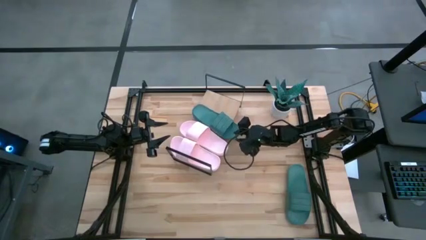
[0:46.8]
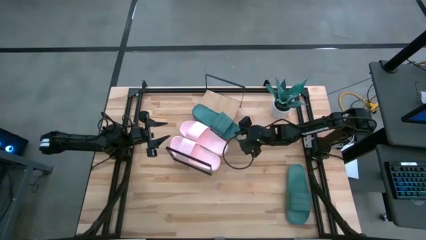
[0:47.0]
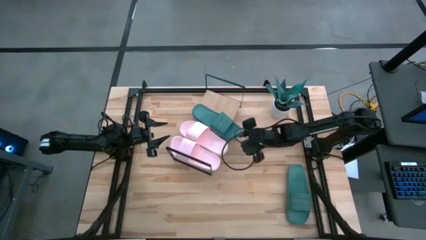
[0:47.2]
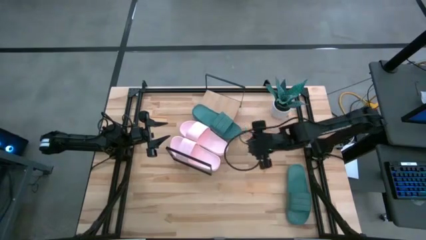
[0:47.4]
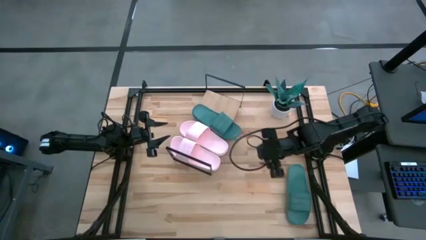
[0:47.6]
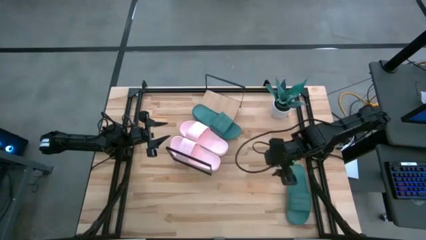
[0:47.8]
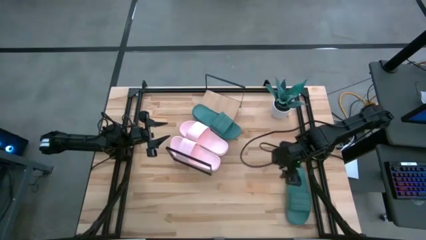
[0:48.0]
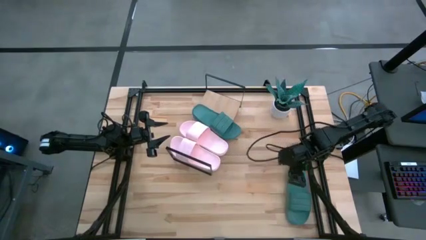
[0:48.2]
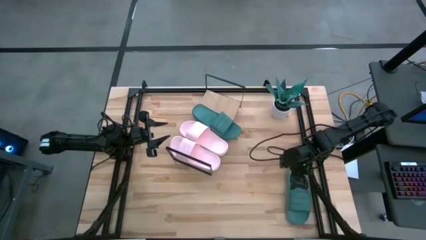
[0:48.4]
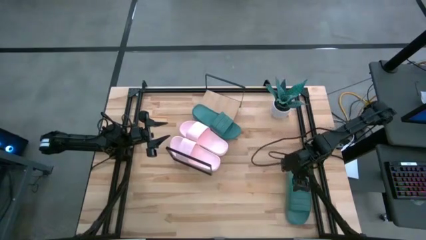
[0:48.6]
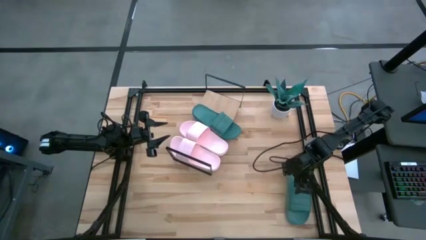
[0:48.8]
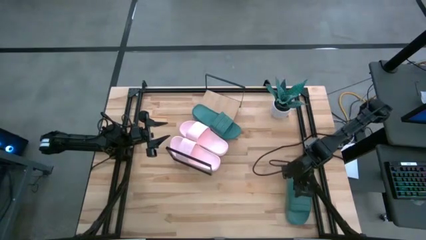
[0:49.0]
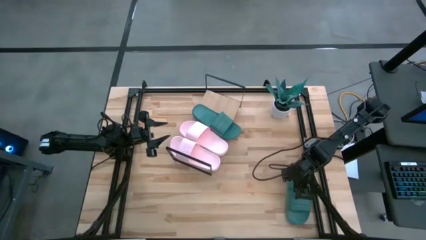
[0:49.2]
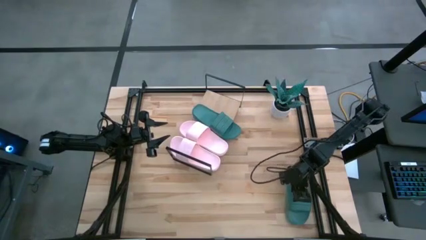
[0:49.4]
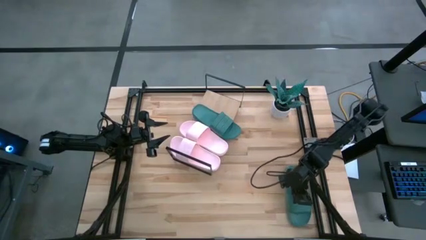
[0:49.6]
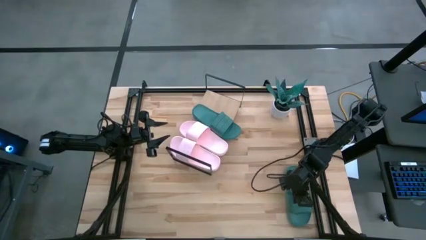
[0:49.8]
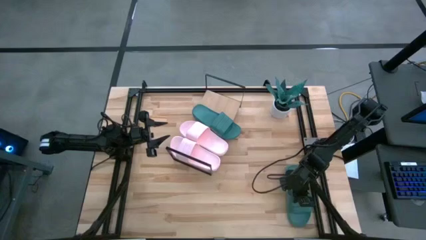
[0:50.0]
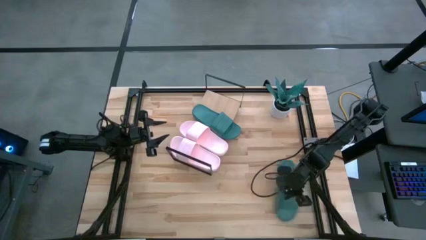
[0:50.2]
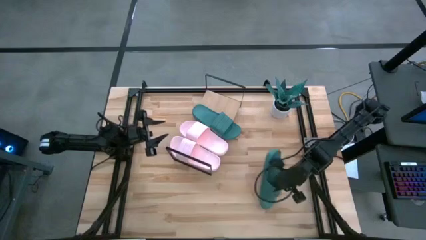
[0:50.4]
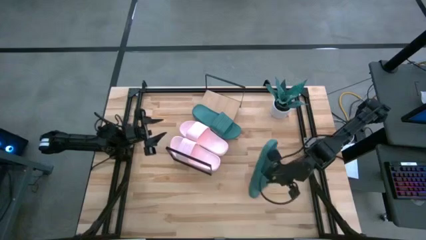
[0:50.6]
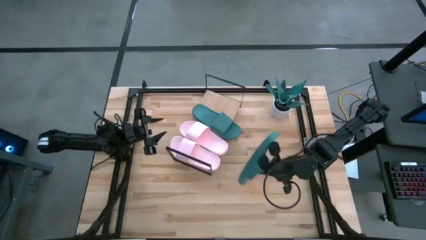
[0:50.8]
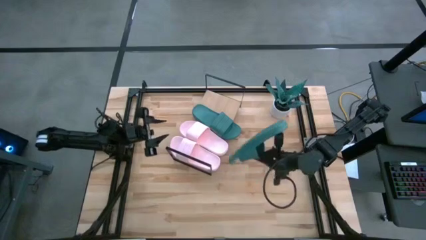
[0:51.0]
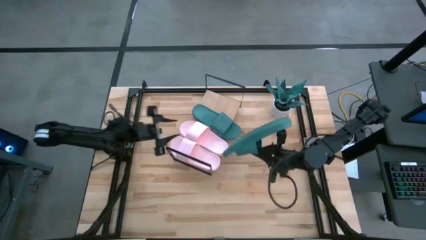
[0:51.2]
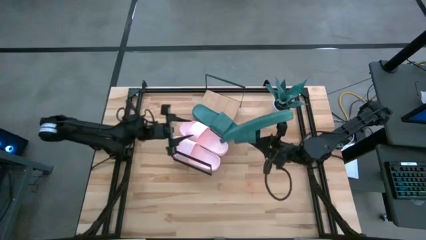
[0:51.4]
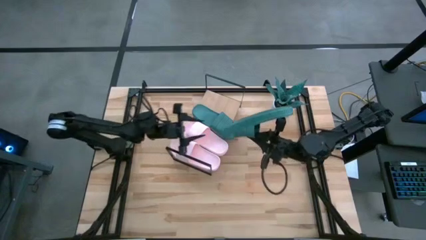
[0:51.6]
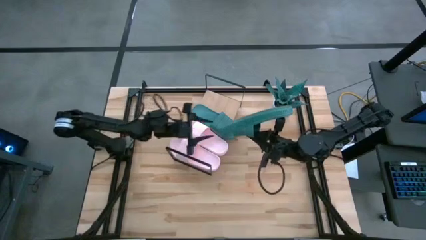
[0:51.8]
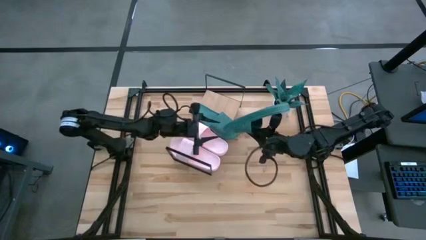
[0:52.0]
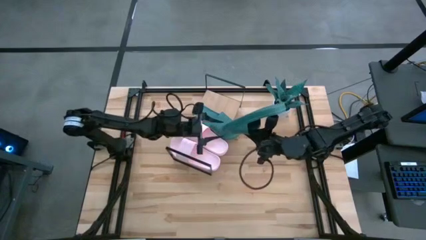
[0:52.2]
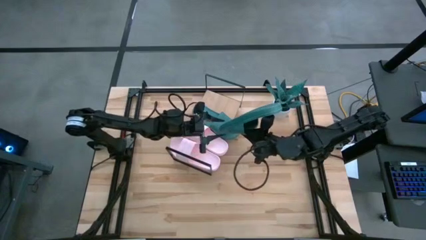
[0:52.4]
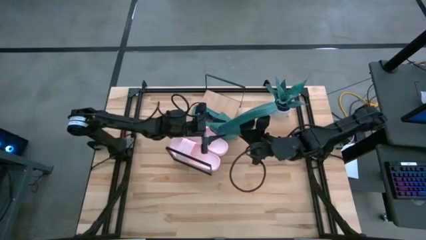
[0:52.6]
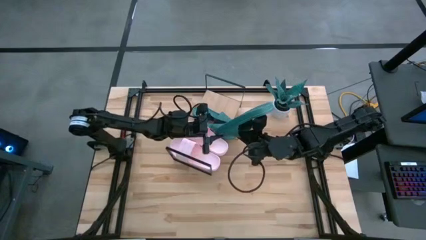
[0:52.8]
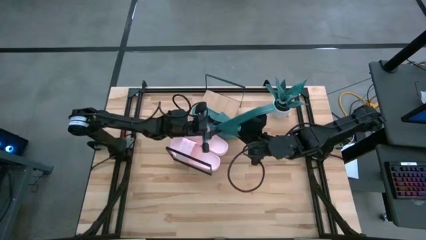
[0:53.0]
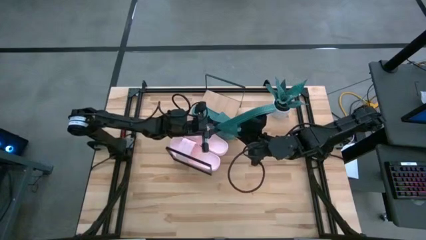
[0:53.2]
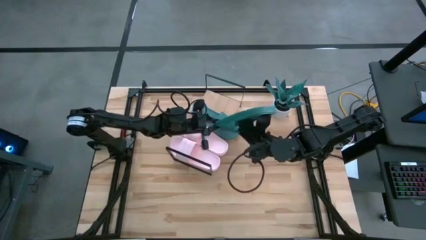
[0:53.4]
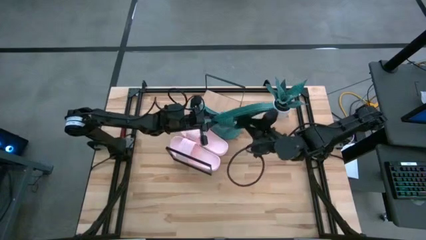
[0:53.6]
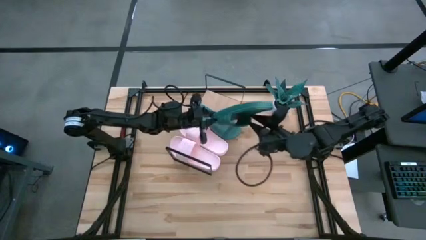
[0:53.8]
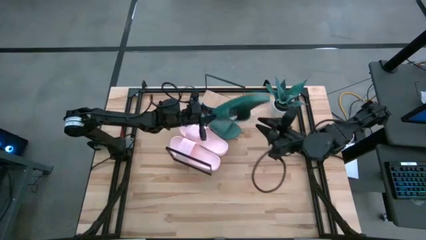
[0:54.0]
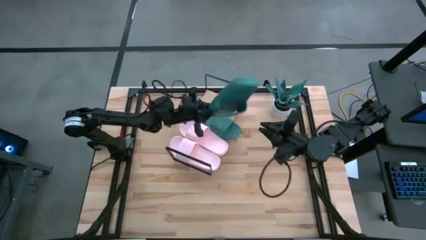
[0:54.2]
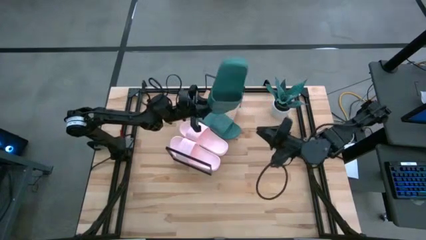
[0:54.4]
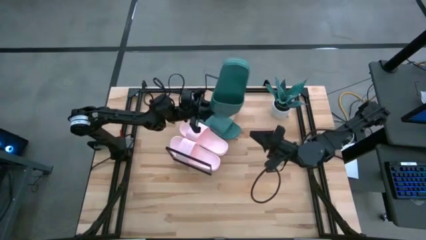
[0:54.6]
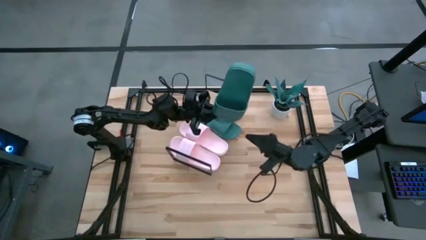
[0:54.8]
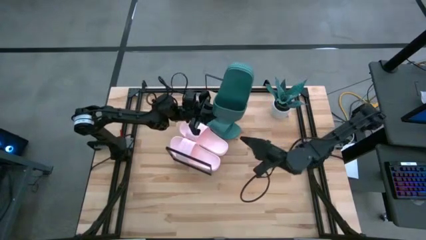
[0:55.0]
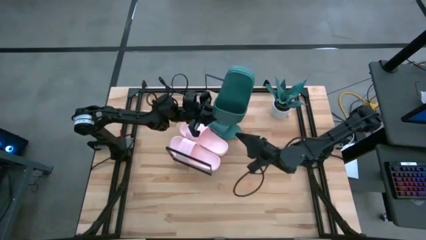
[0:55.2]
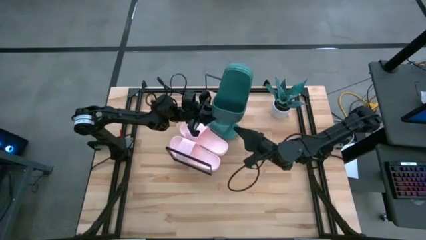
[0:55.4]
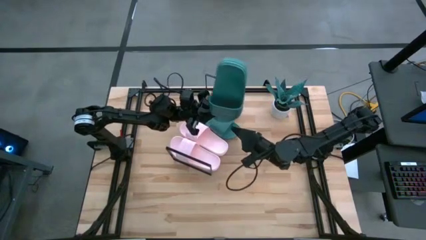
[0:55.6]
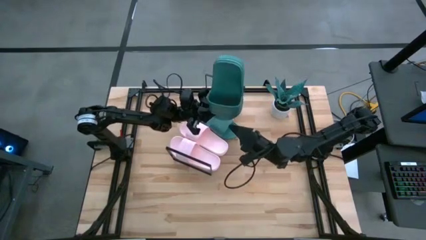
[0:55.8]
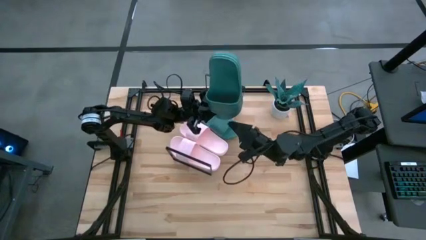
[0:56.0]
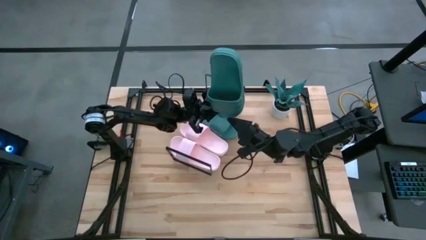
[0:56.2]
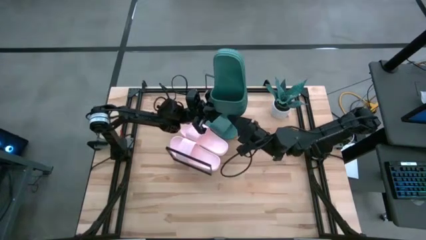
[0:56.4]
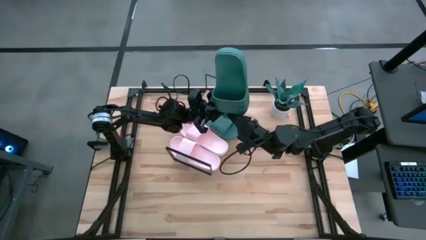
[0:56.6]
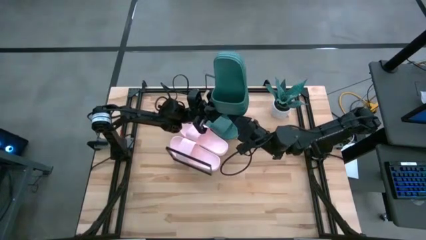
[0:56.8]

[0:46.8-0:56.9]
Task: Pick and place slides into the shelf
Put the dark green slide on the shelf

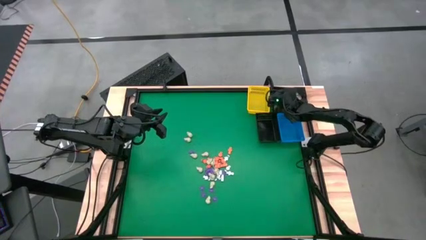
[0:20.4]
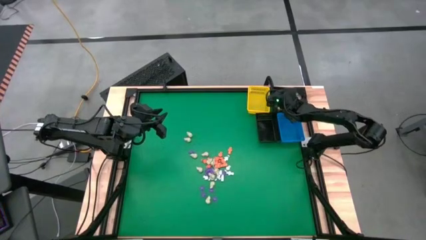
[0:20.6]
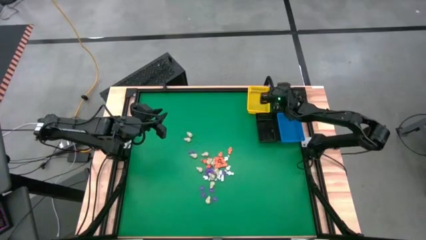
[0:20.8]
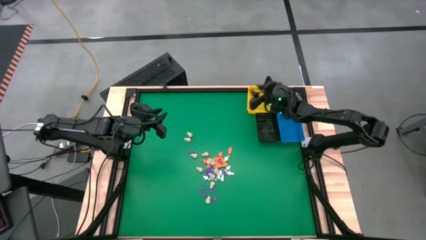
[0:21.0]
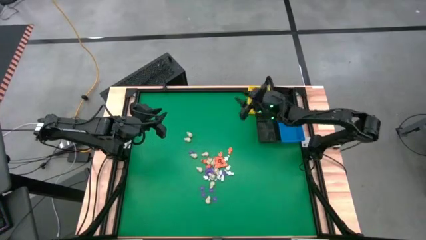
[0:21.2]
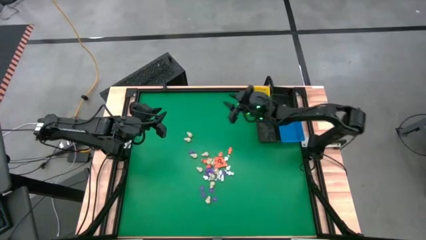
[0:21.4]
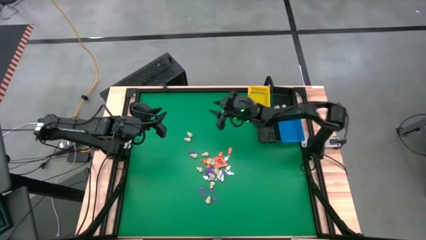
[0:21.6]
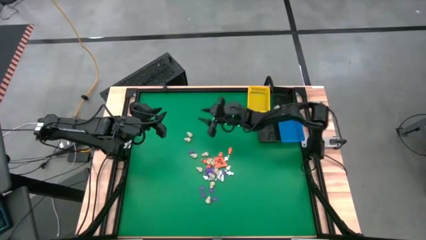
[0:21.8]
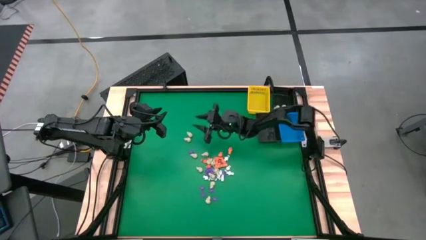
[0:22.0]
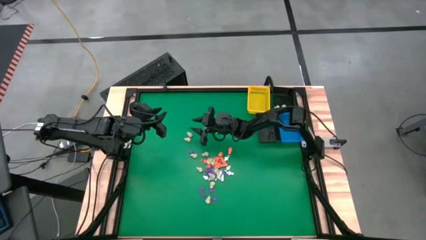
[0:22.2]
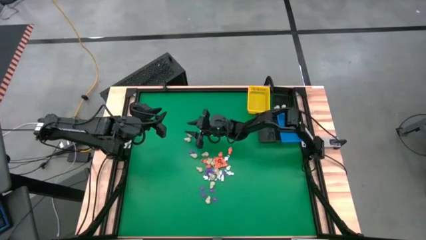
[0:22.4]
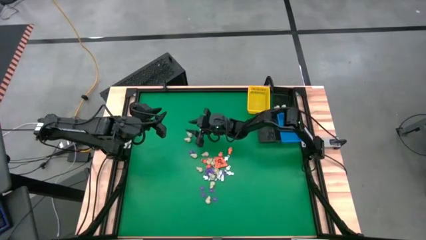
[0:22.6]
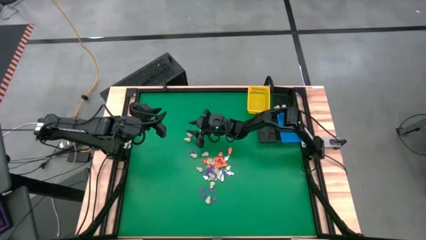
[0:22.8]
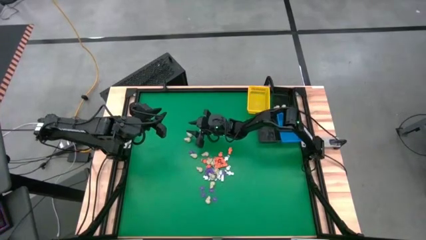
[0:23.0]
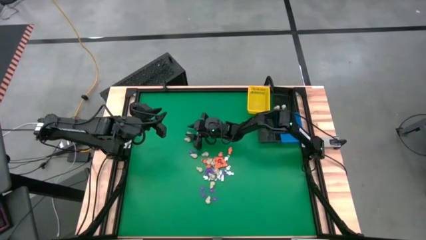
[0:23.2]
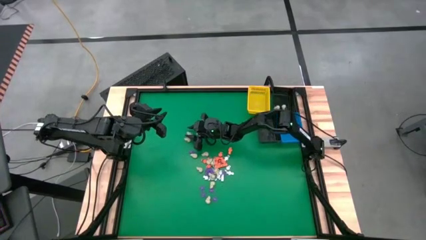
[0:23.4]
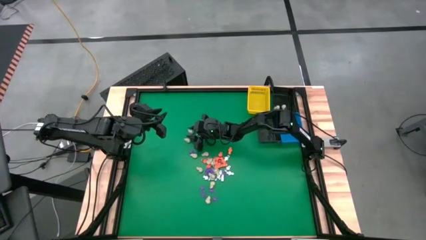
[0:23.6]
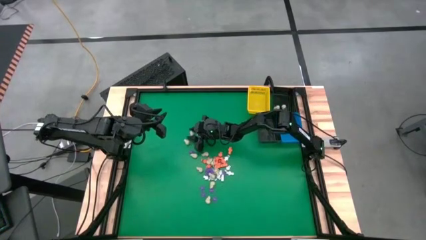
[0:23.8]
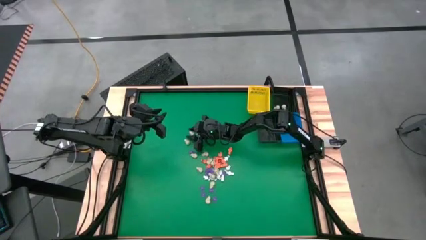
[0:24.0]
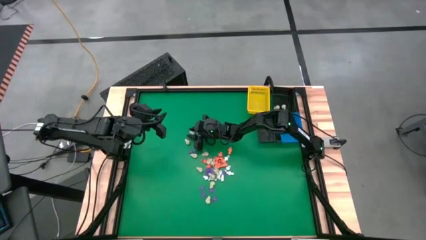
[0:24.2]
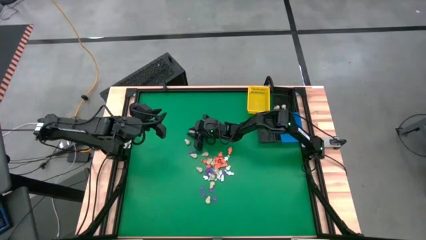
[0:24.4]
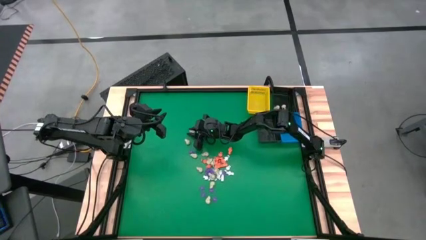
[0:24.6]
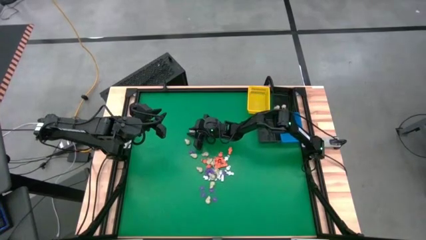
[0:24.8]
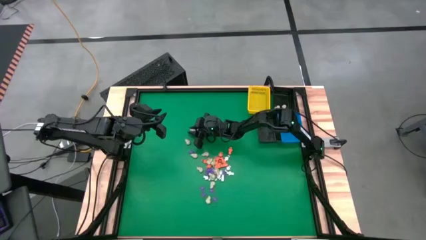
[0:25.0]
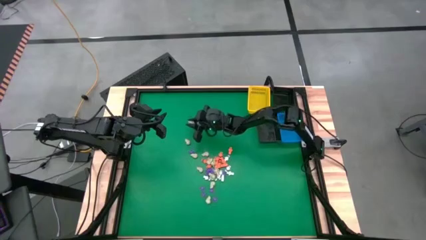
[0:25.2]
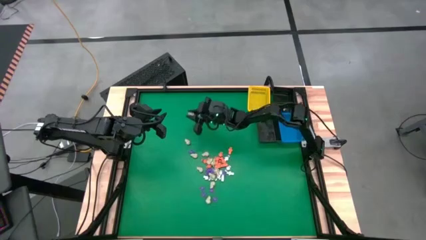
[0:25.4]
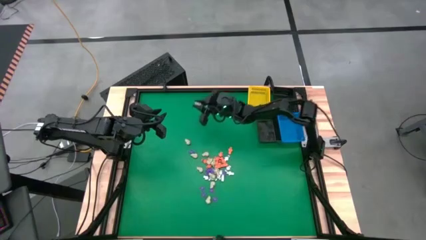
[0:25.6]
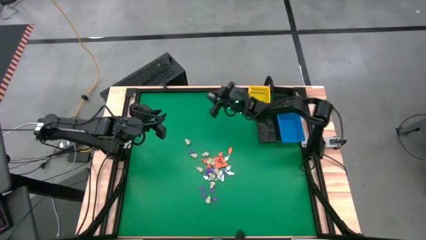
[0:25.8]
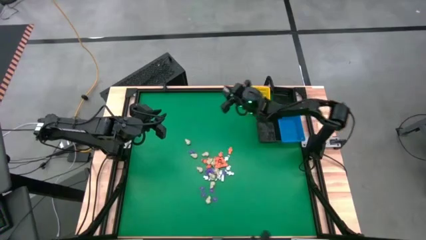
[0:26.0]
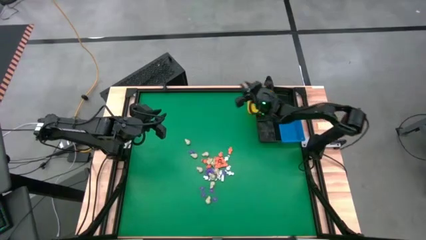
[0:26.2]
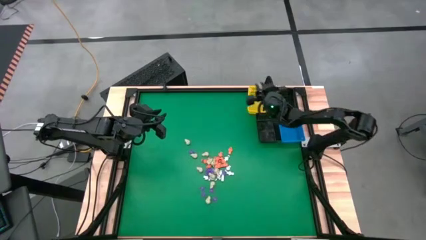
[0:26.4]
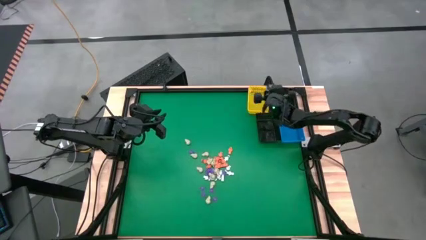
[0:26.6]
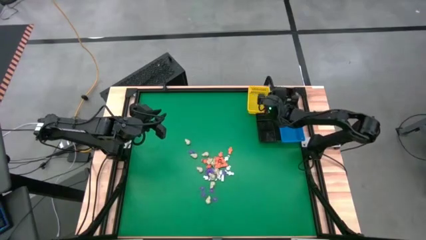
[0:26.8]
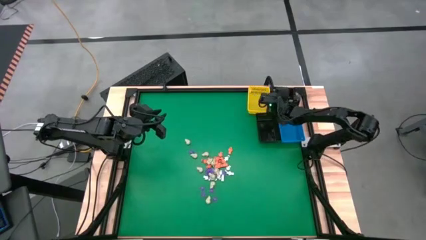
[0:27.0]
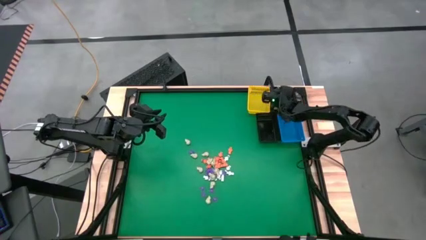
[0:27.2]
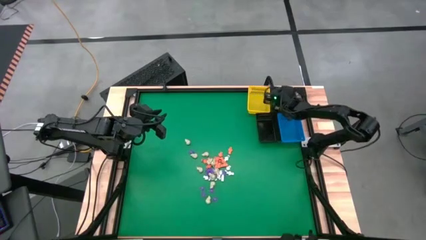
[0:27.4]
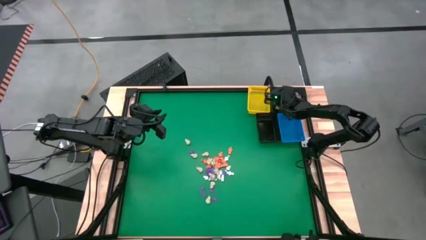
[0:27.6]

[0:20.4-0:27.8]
Task: Sort Halloween decoration
Put the gray skull toy into the top black basket
